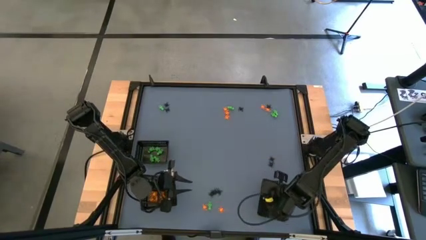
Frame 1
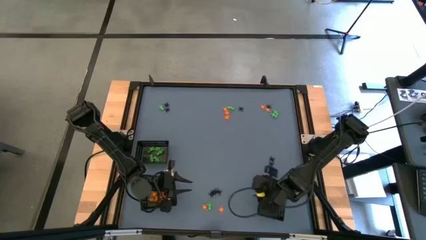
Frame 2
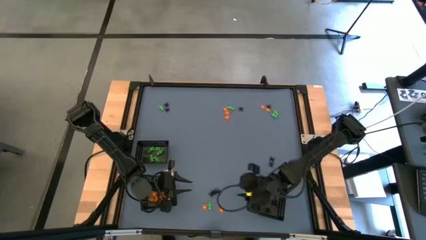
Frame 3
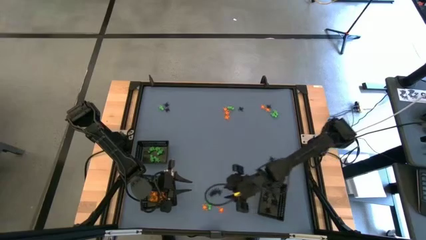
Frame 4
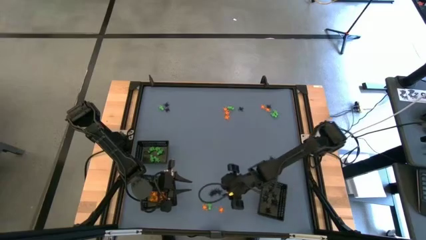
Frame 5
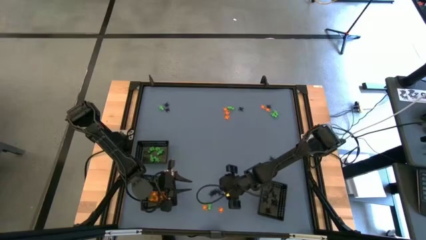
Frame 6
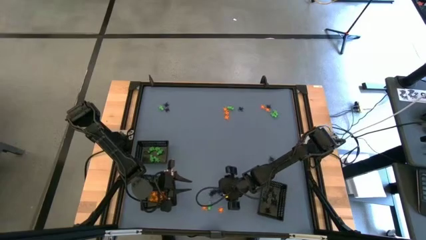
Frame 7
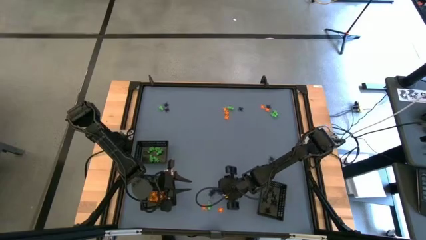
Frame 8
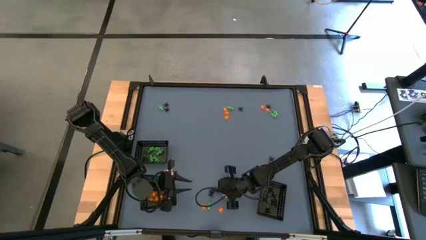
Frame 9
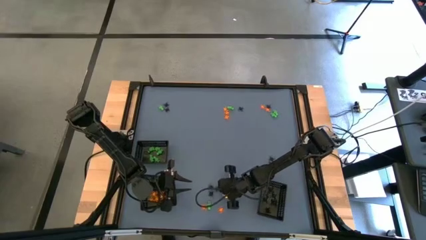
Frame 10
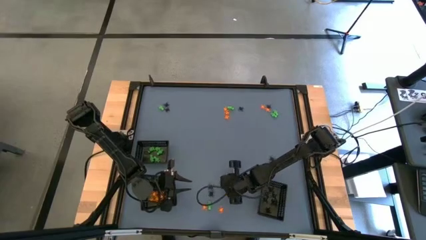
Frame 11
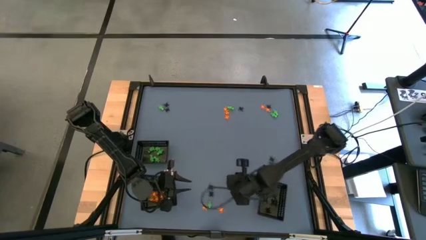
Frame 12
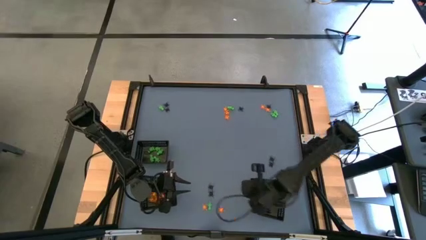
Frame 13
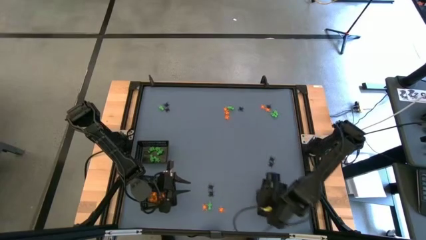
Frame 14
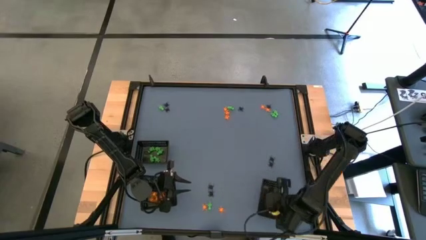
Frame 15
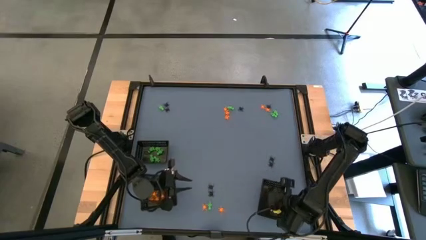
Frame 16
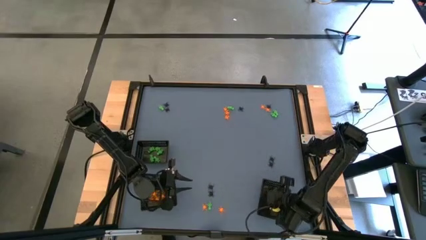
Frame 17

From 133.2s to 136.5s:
Task: Sort Halloween decoration
Put the black spider toy into the bottom right black bin

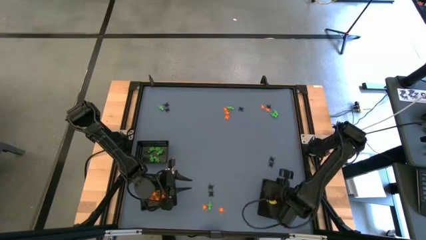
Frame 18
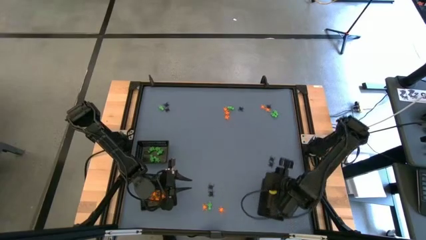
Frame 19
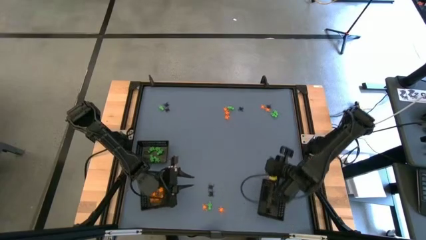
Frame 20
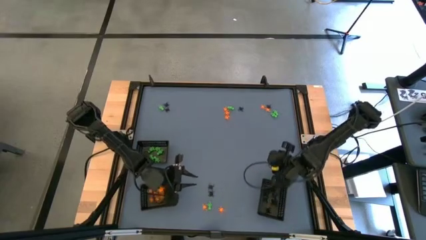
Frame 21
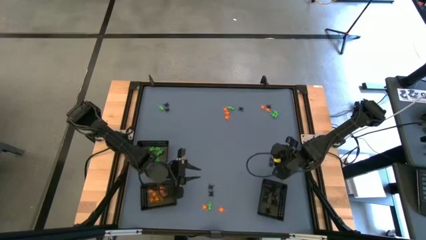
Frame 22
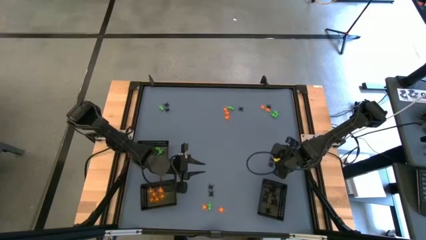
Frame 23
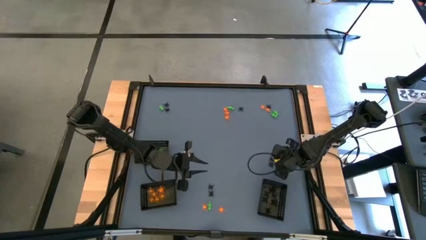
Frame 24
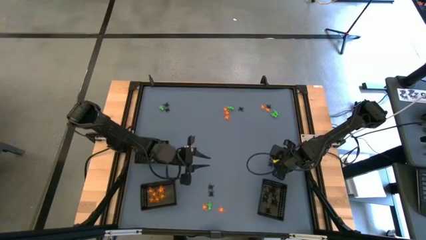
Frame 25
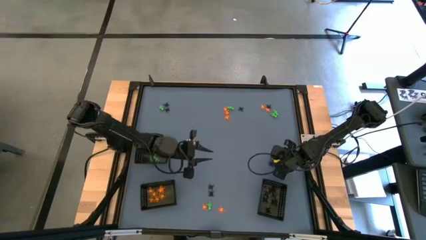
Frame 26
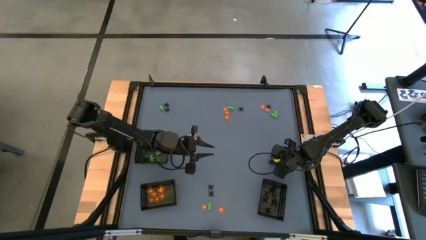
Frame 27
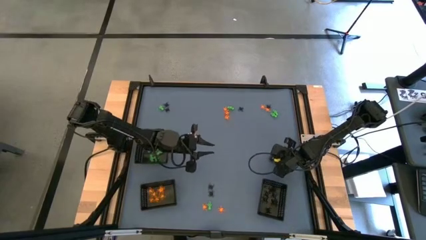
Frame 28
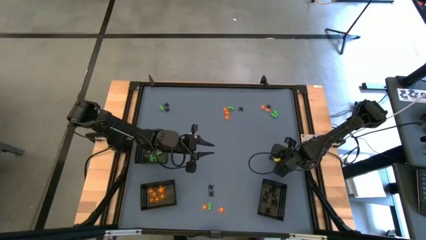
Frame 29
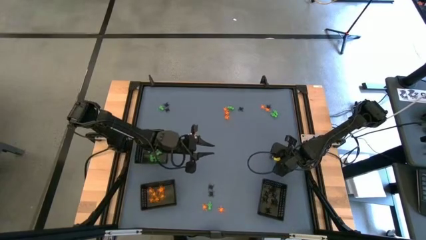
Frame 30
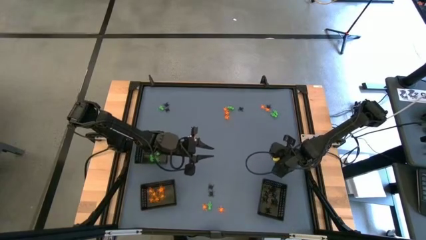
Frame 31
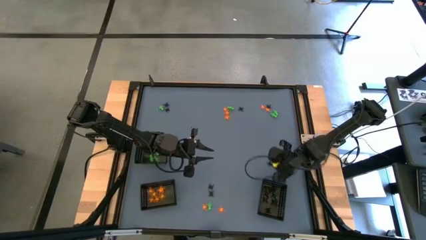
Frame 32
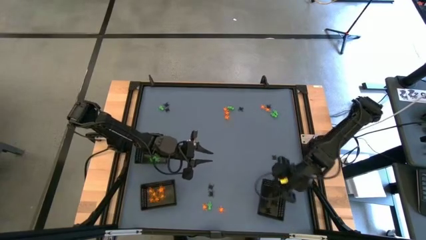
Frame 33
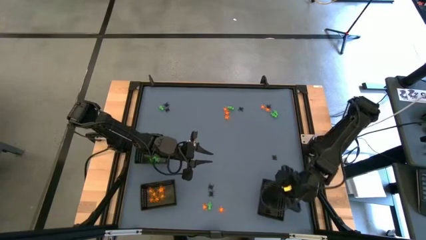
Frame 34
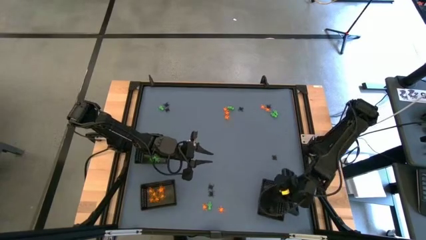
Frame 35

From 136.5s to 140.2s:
Put the black spider toy into the bottom right black bin

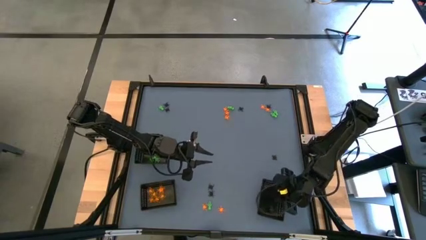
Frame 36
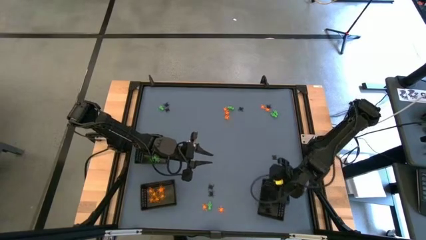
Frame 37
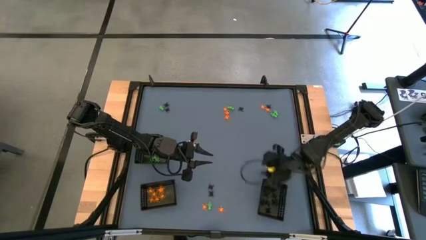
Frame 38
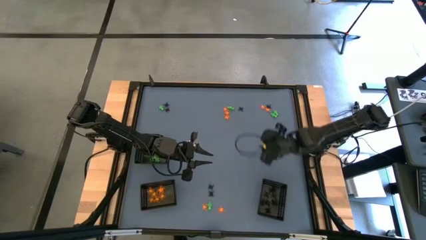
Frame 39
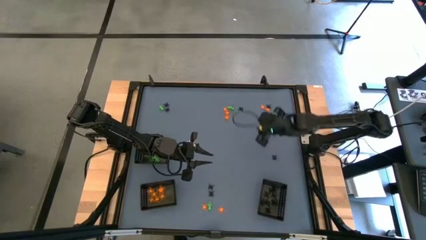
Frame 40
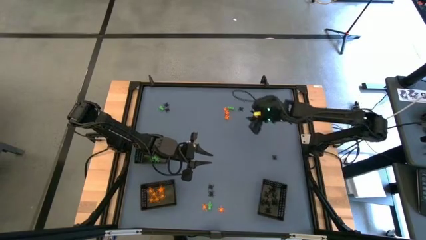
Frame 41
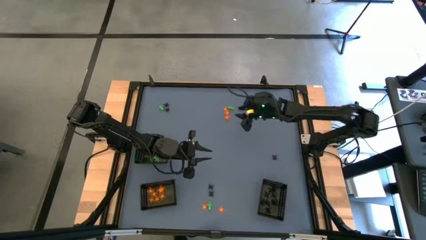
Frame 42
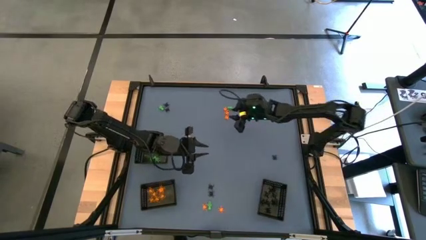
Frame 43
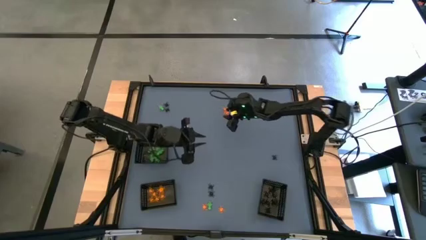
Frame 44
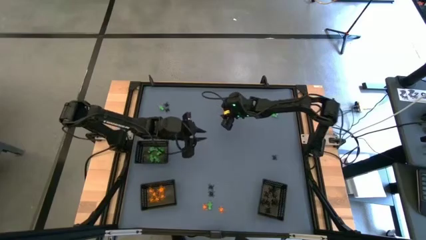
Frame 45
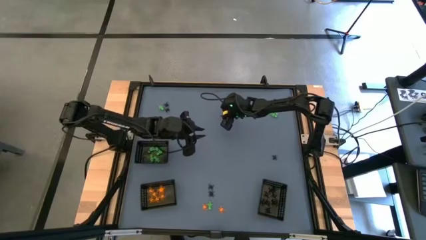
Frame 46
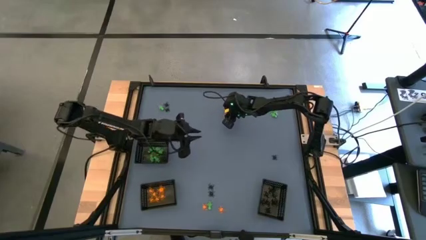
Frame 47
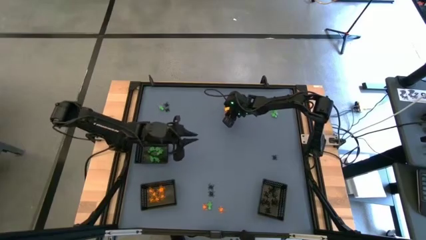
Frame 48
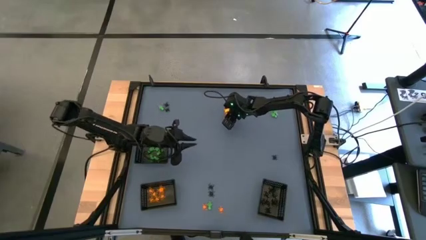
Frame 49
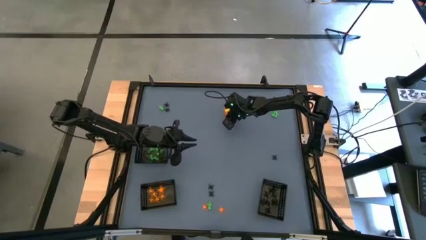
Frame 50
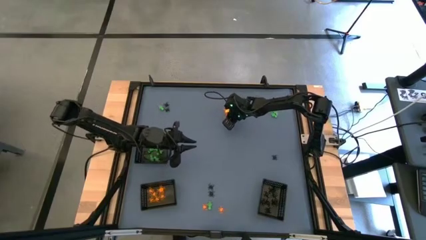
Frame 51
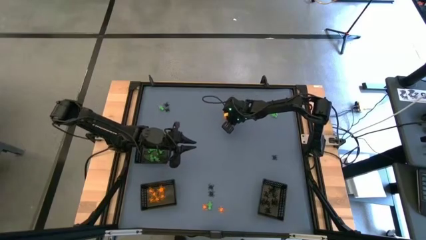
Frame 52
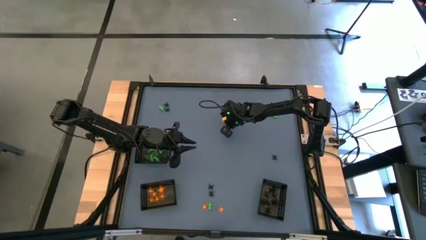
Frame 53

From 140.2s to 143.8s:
Put the orange spider toy into the bottom left black bin

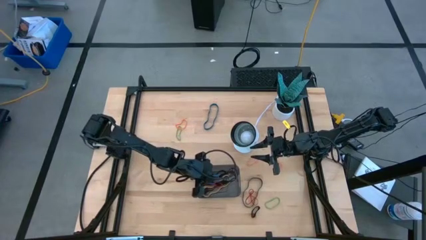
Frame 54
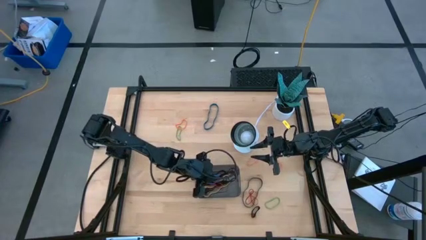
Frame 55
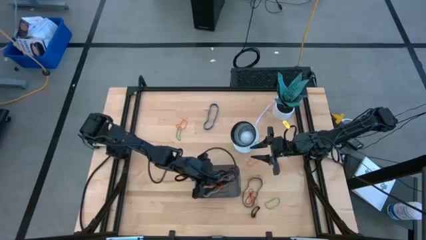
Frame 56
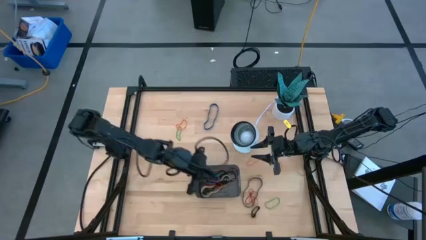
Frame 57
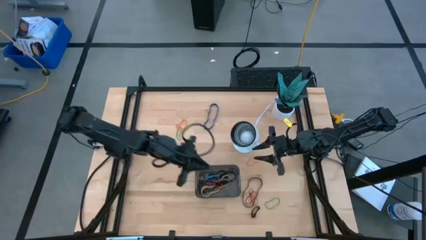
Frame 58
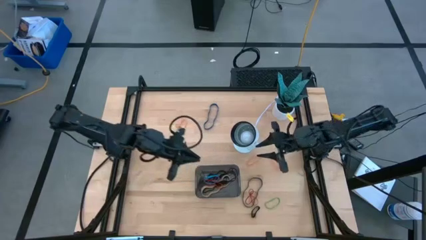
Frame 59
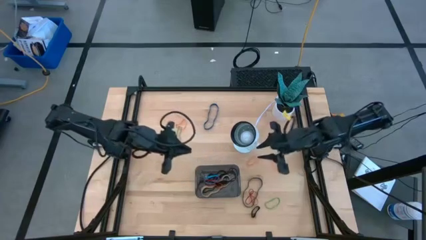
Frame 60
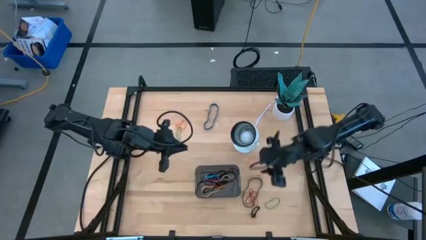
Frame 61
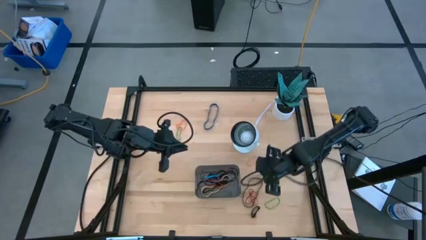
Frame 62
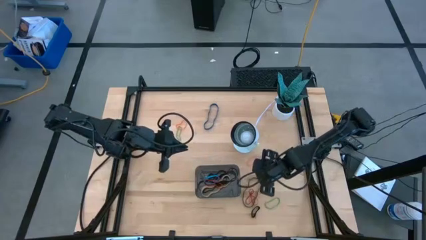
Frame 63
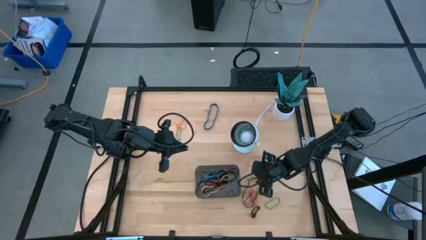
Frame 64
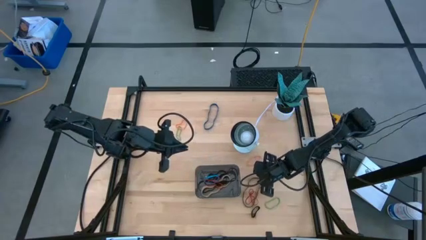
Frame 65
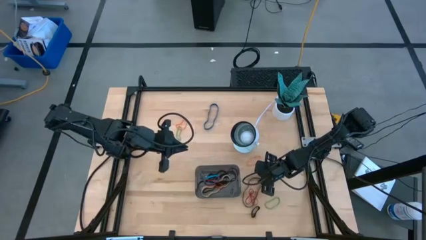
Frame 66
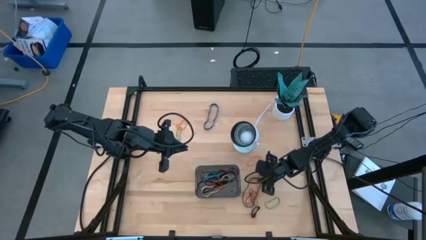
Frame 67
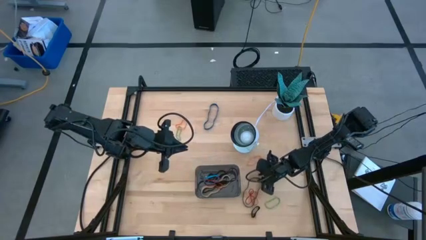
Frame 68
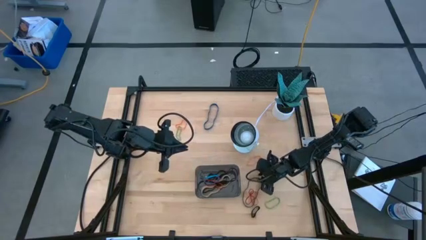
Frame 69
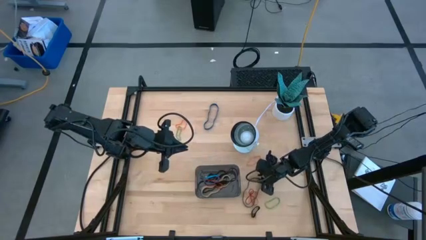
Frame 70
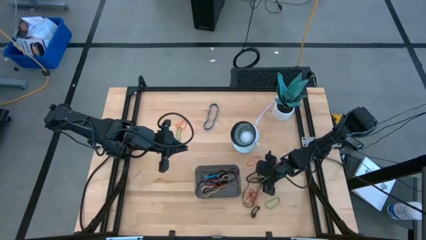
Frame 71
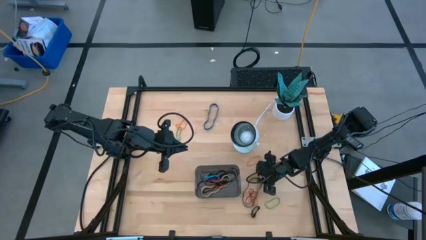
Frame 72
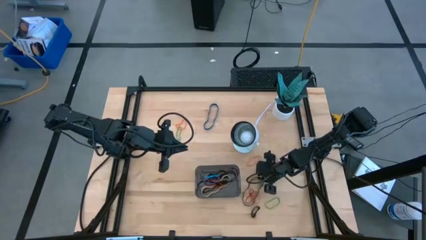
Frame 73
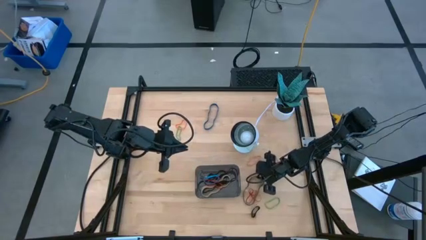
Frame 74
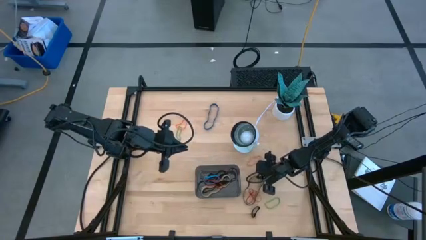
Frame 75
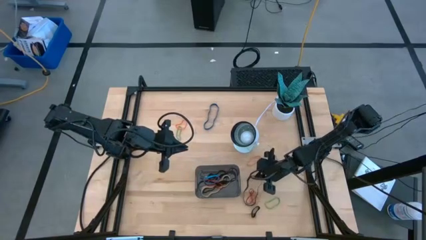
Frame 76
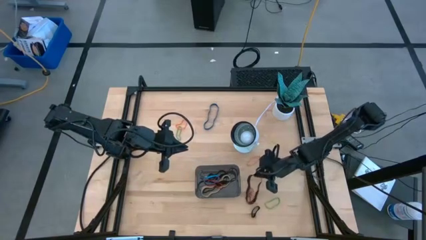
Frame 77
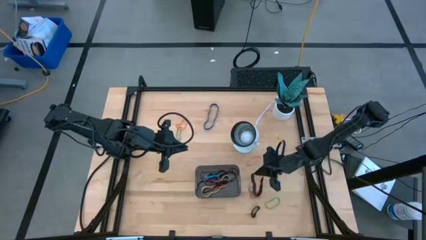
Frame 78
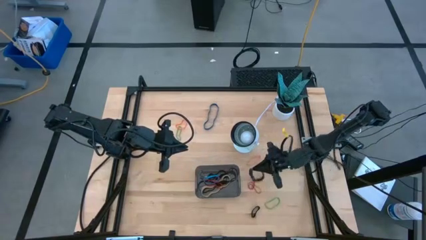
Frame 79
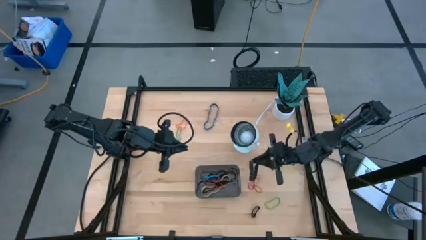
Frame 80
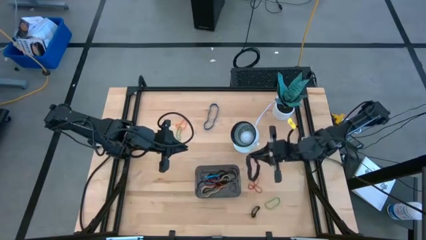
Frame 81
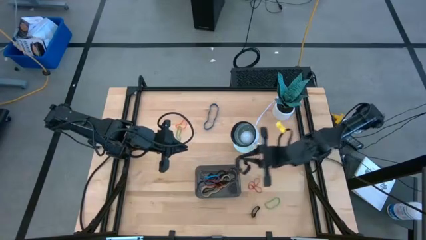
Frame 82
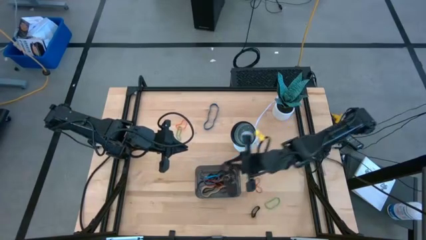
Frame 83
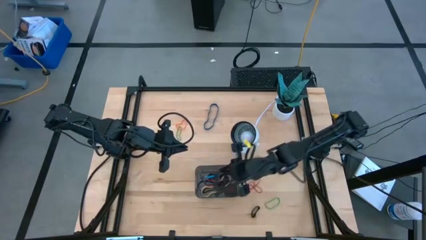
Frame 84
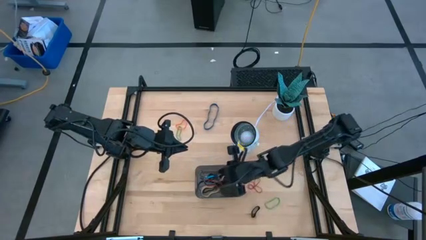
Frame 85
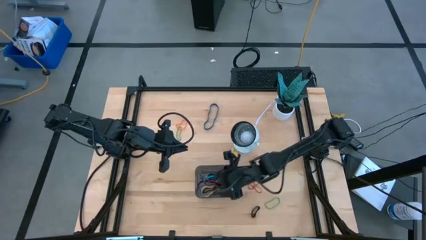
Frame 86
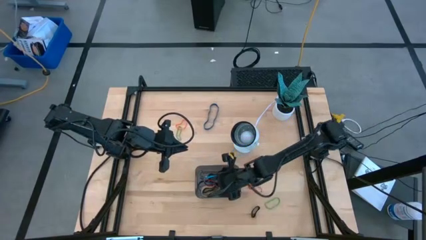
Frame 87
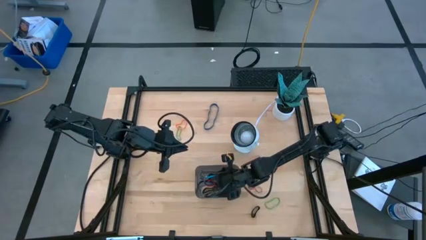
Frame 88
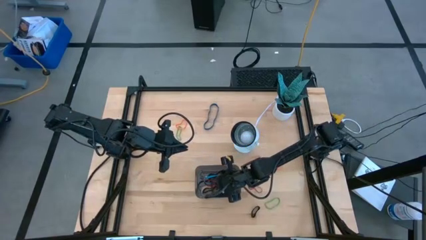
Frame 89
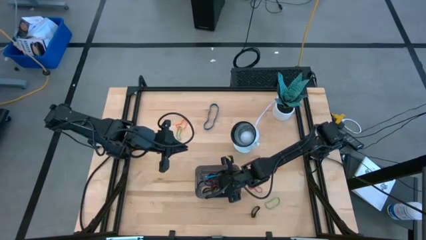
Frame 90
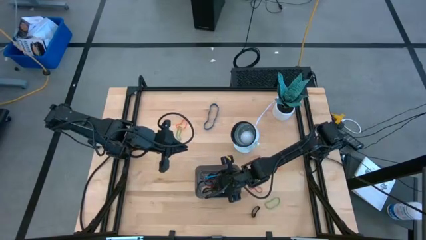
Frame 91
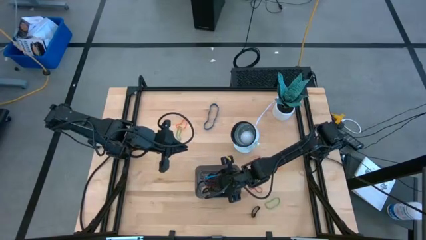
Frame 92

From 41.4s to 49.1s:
Task: Pick and place rubber bands into bin
Put the large black rubber band into the black bin
